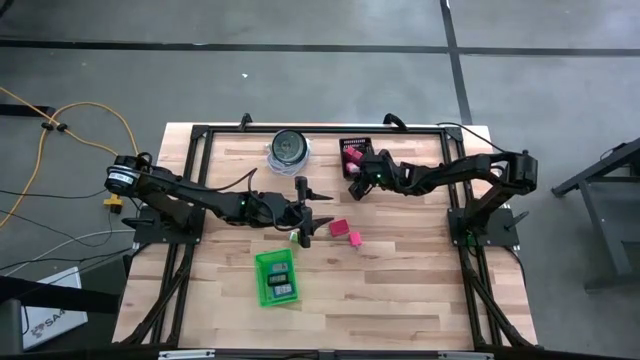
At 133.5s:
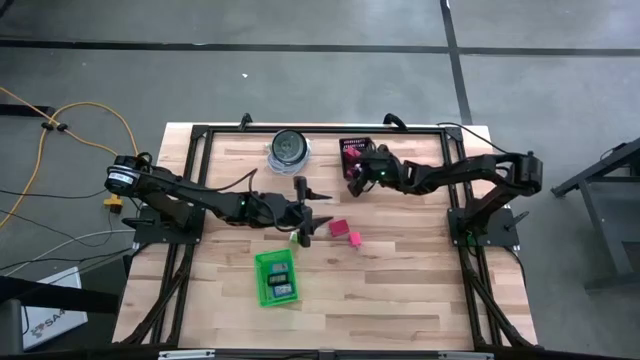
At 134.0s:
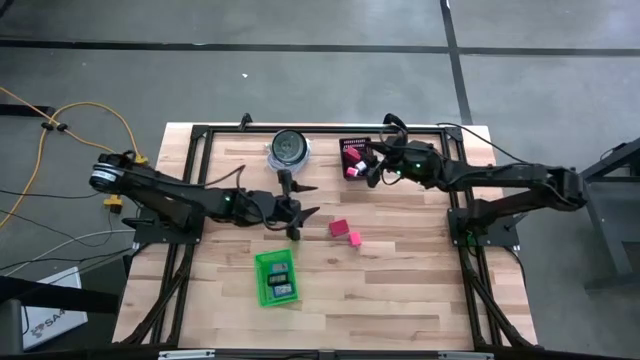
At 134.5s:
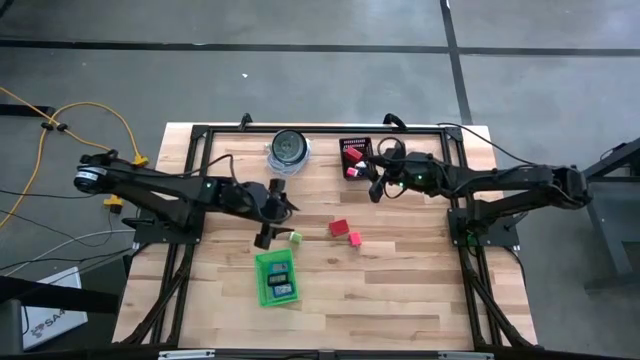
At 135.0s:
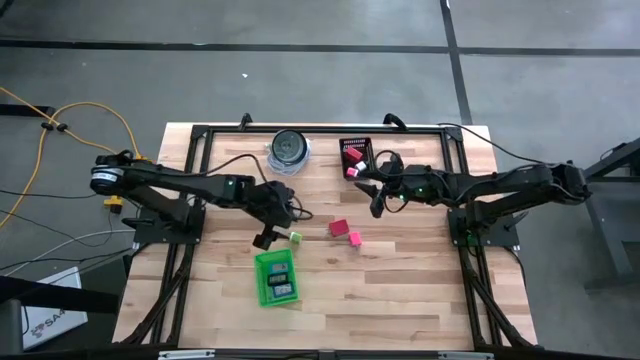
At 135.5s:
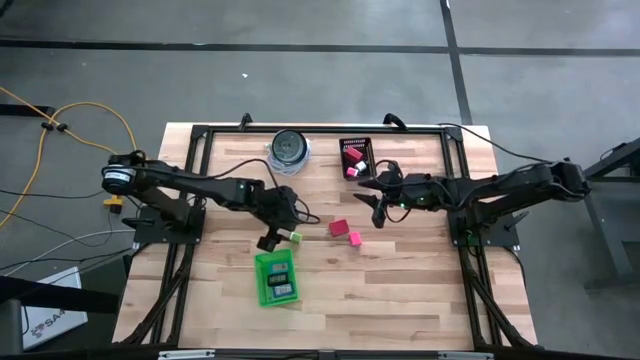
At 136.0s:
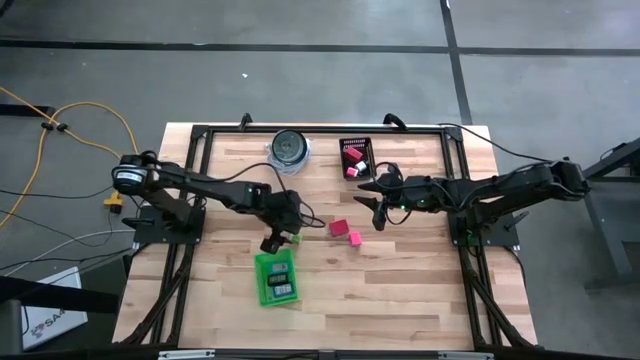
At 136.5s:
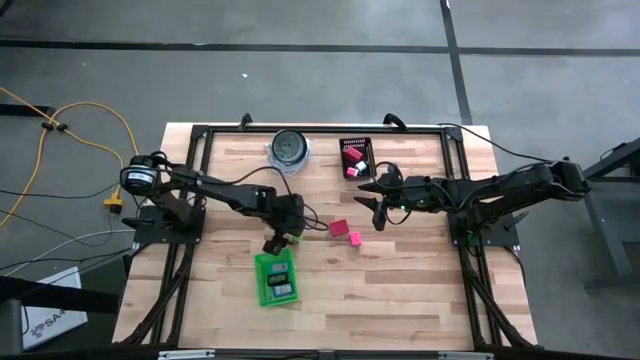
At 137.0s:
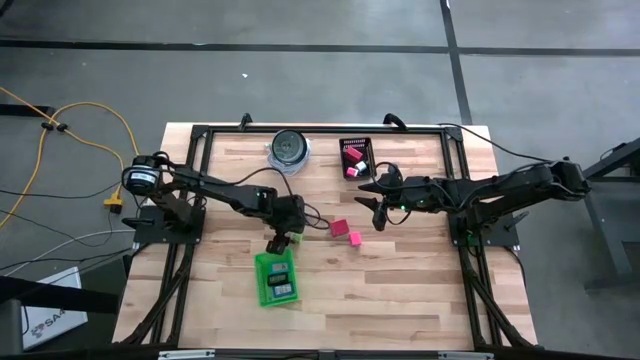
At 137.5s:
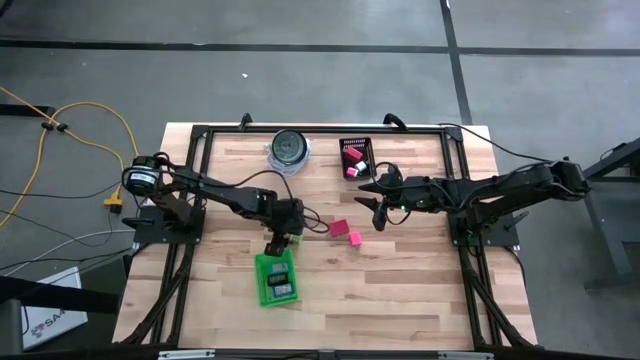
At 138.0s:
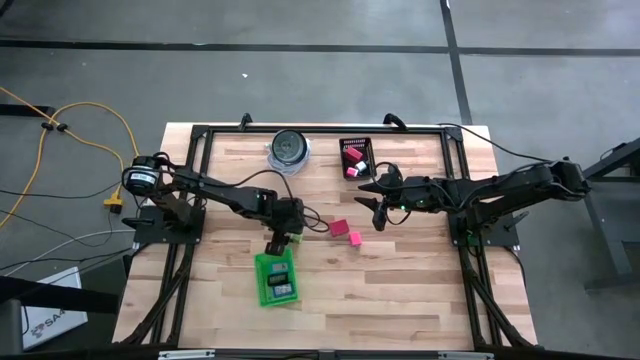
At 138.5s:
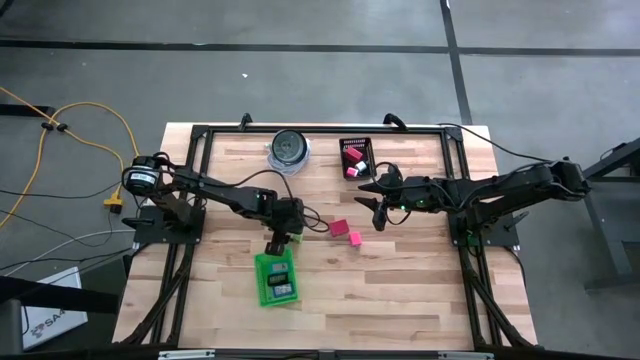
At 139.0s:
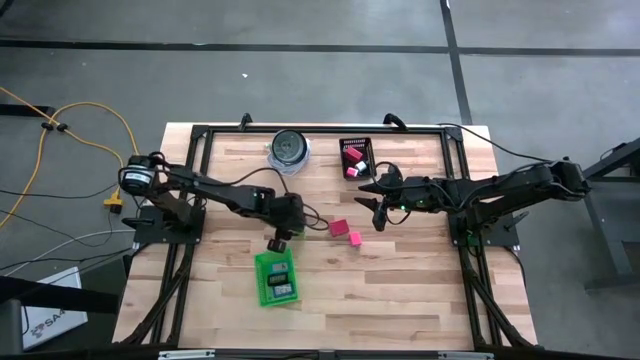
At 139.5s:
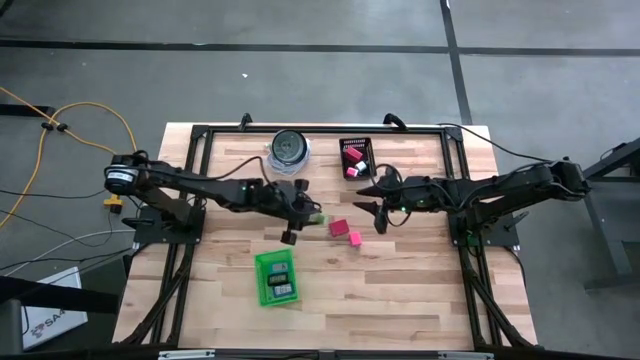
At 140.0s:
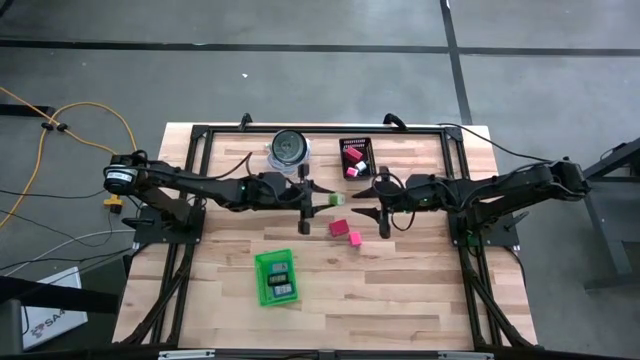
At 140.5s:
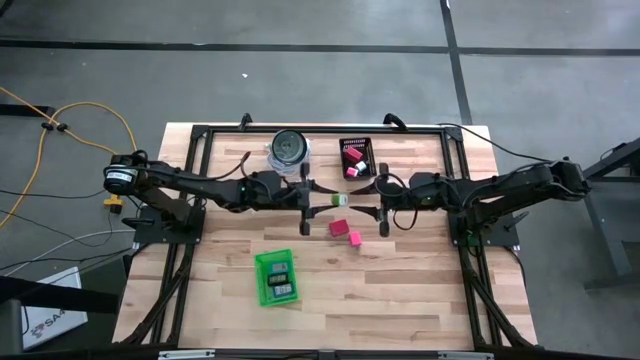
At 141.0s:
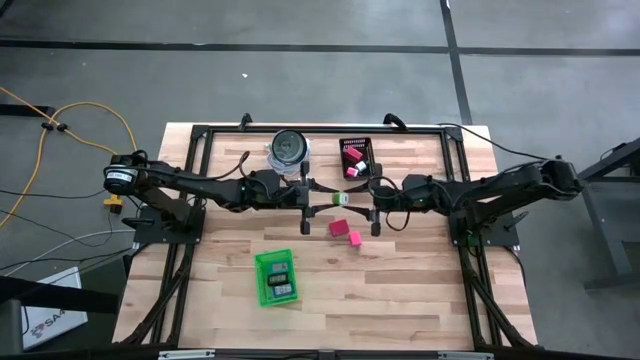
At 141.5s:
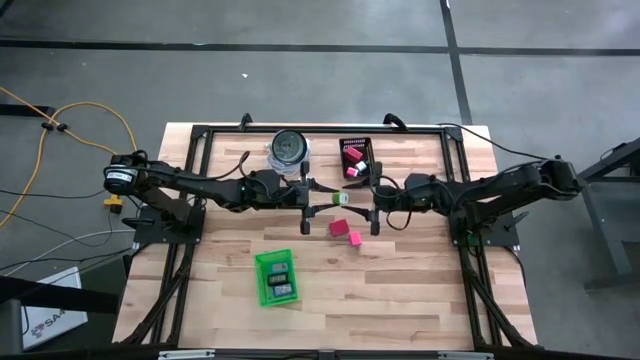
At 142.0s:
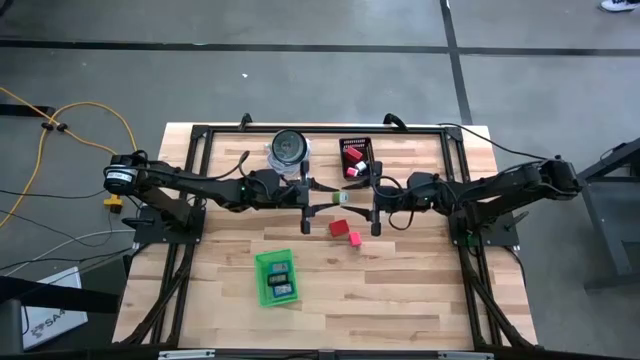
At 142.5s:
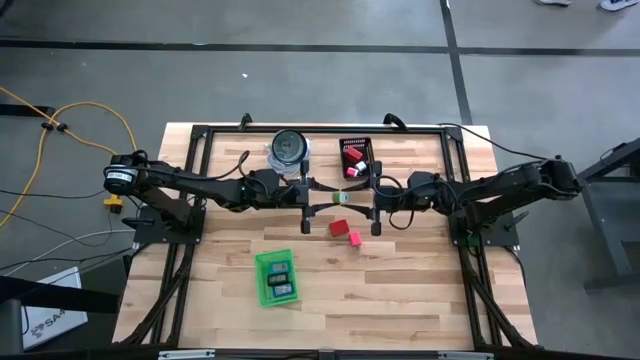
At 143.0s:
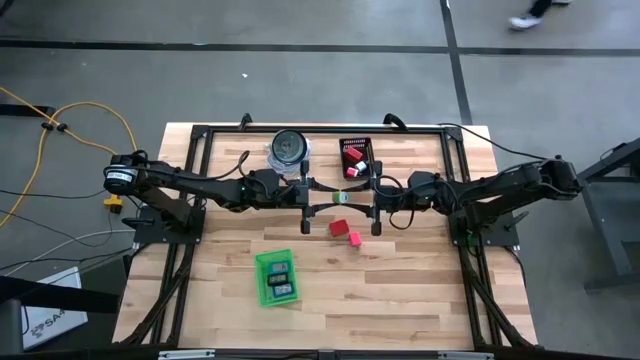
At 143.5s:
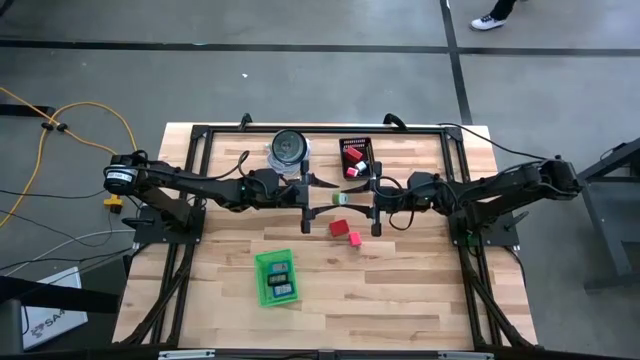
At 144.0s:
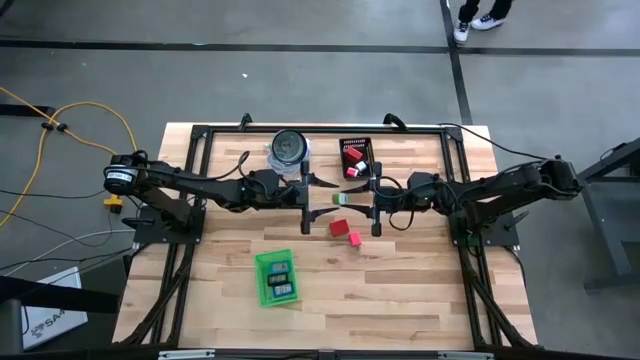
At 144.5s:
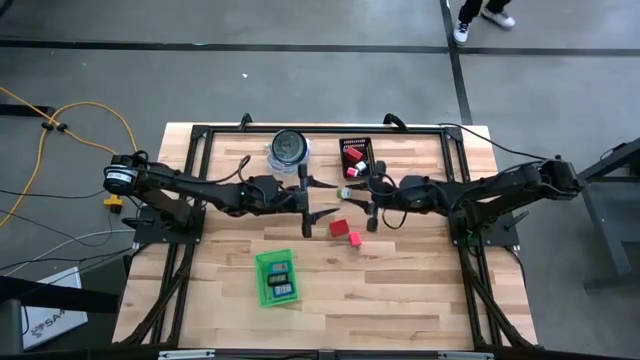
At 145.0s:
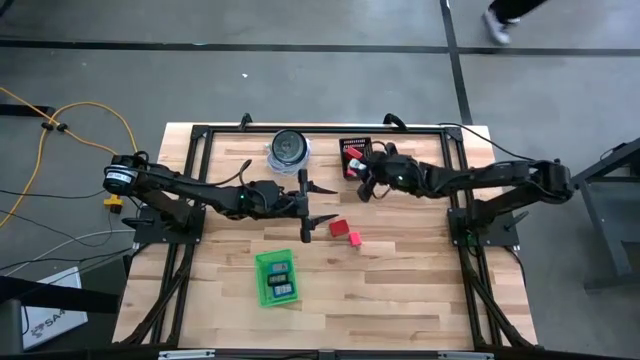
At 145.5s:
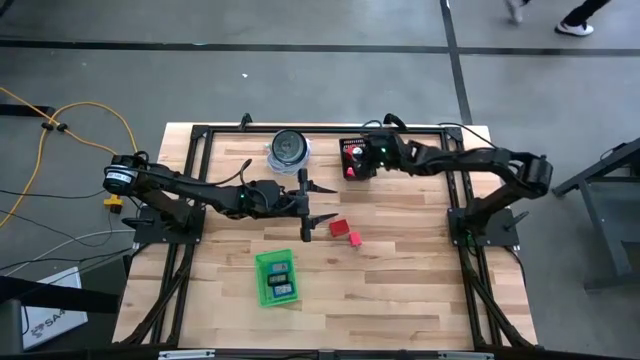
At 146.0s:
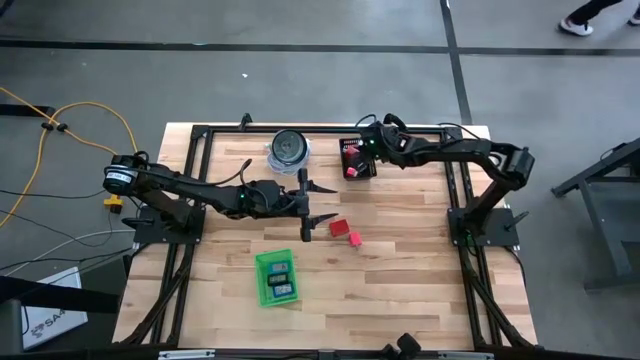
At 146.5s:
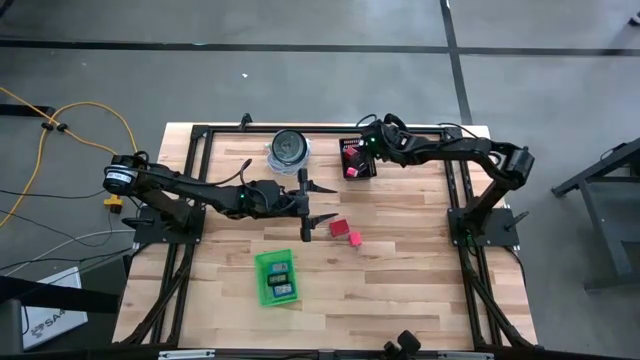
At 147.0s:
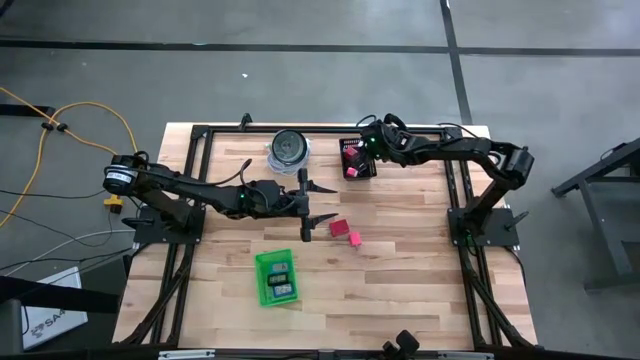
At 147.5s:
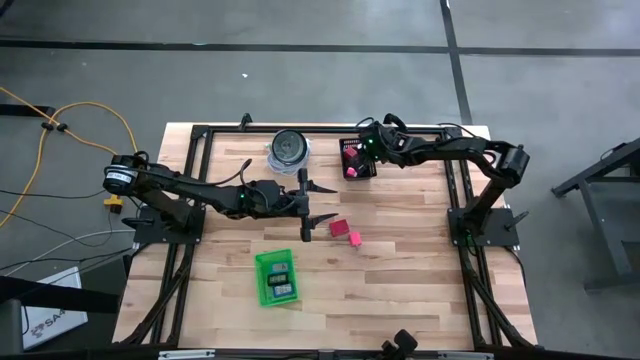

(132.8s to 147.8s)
Task: Pick & Place Office items
Put the green charger adapter into the black bin
